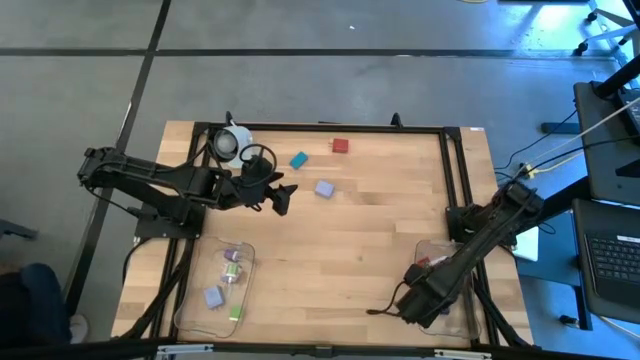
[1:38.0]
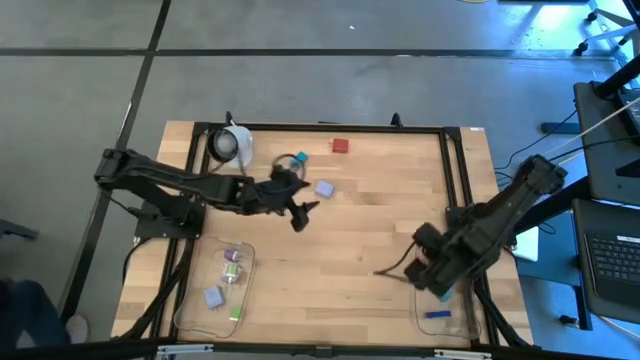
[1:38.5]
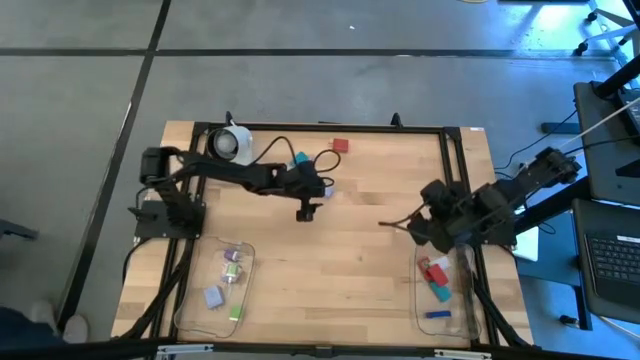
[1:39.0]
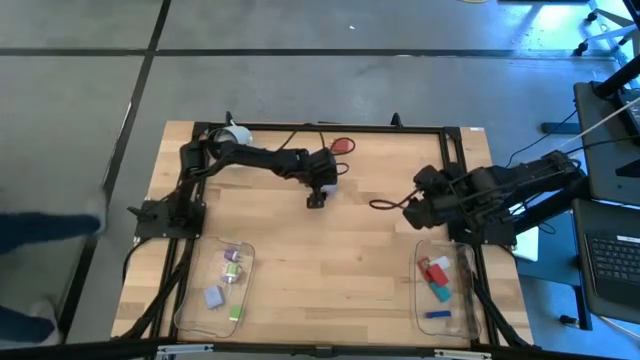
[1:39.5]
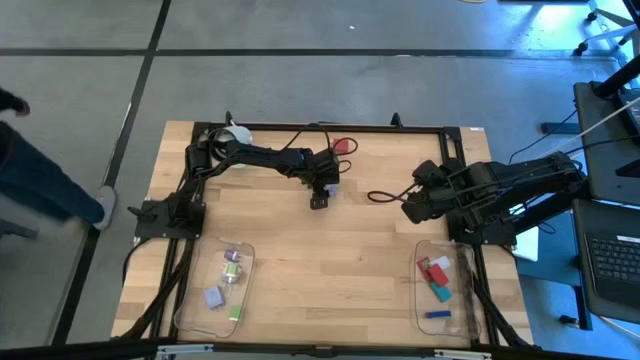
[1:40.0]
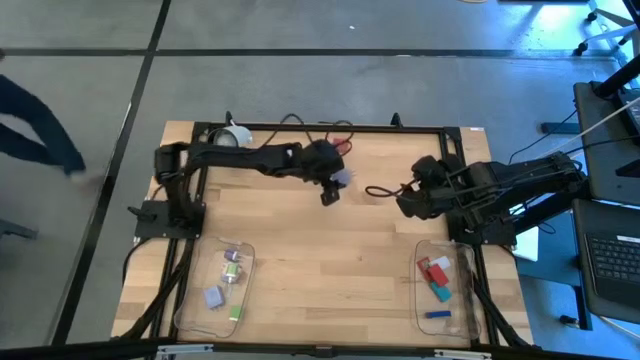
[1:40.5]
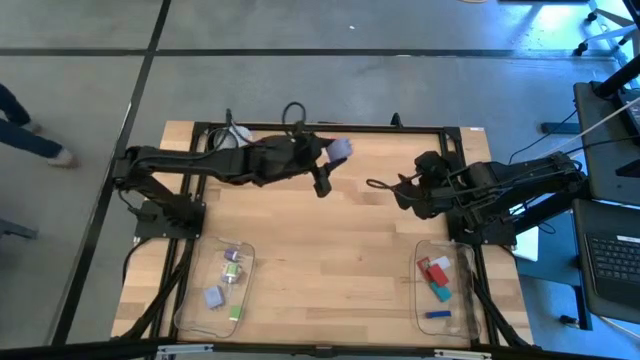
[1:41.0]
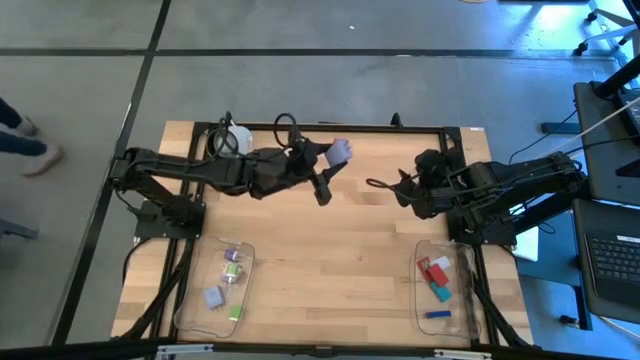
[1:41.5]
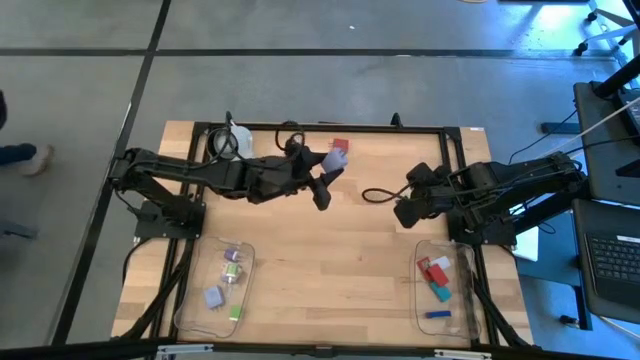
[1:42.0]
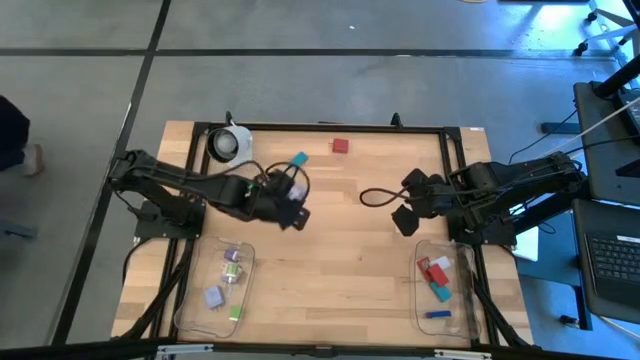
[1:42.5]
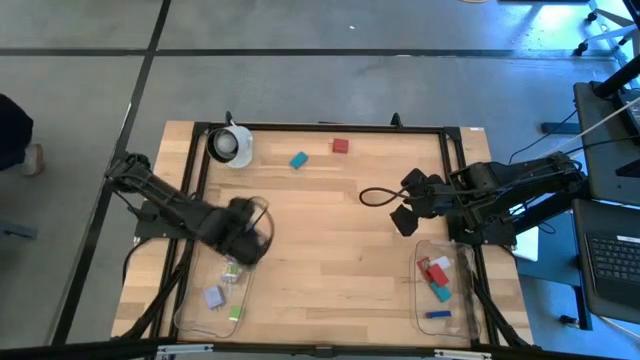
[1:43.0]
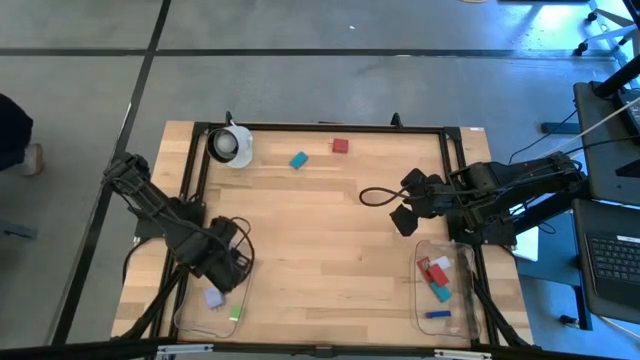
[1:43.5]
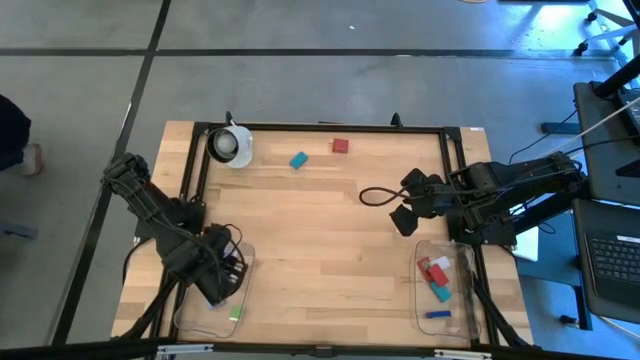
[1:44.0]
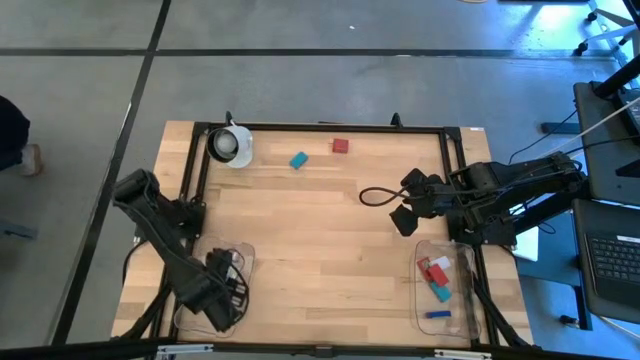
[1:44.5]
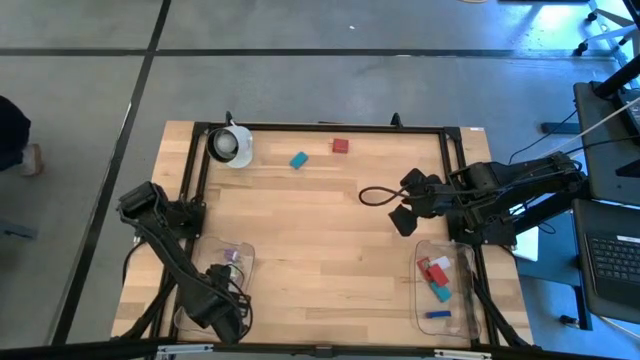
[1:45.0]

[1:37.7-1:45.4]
Task: Pick & Place Office items
Put the purple adapter into the left transparent bin

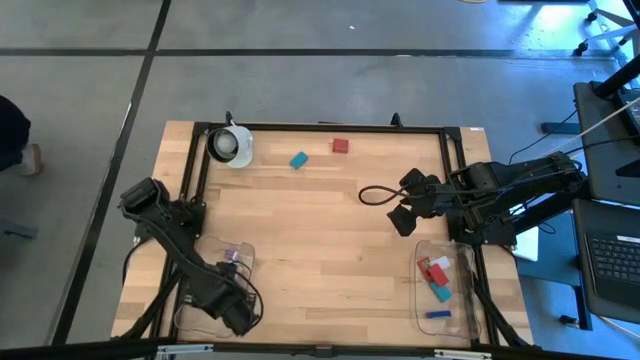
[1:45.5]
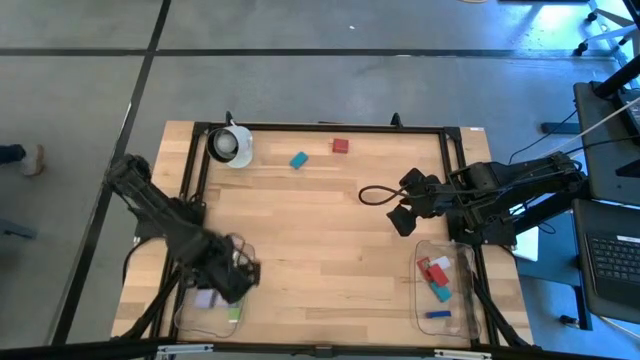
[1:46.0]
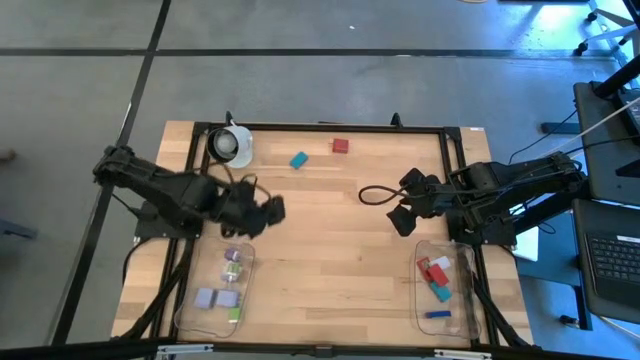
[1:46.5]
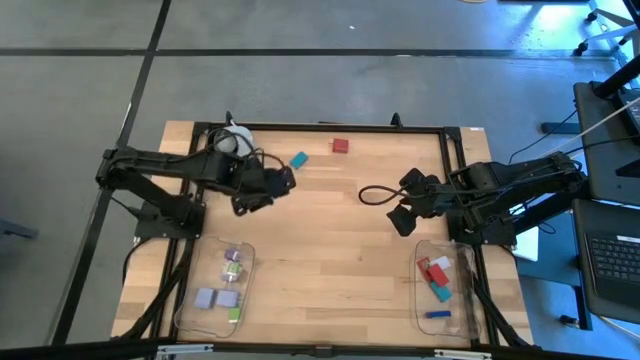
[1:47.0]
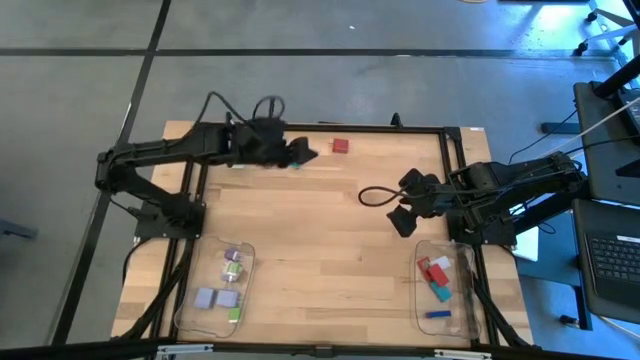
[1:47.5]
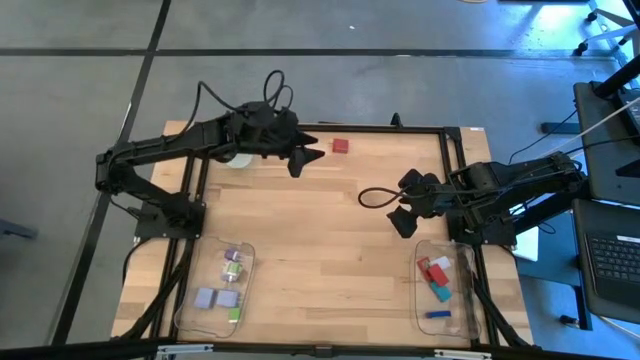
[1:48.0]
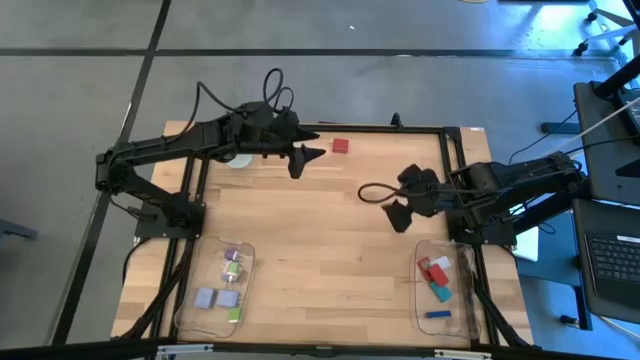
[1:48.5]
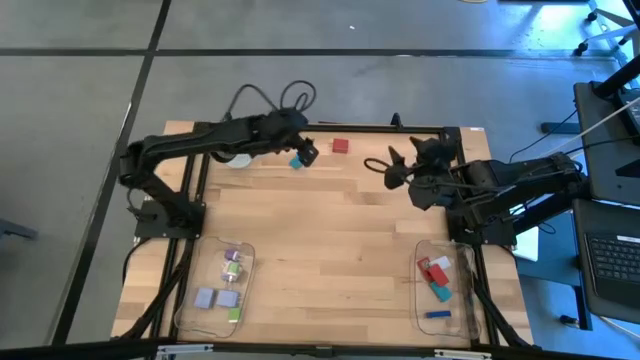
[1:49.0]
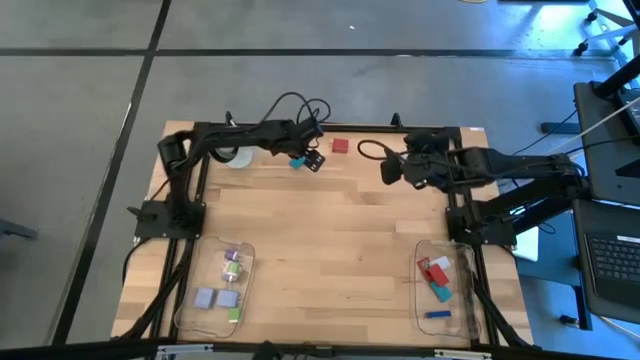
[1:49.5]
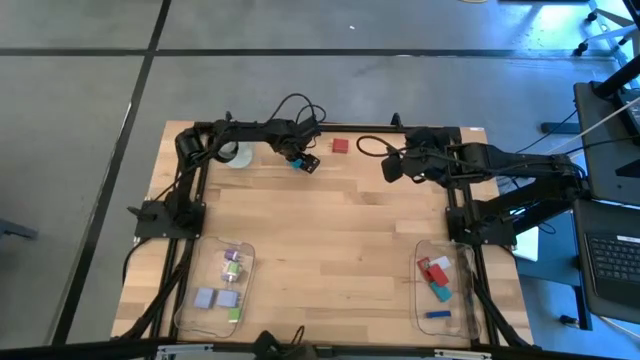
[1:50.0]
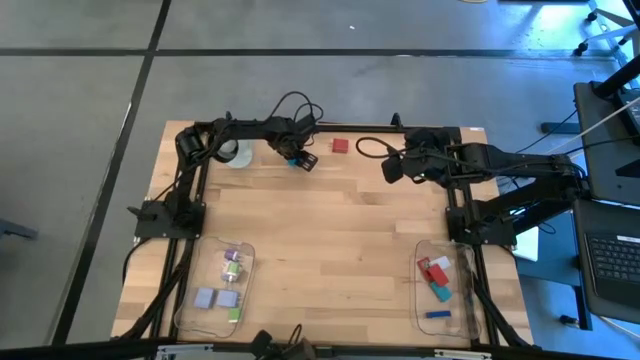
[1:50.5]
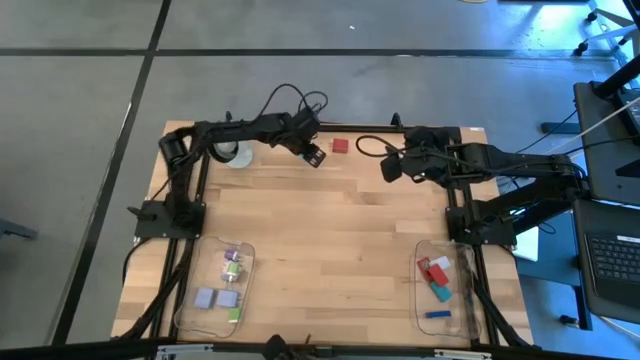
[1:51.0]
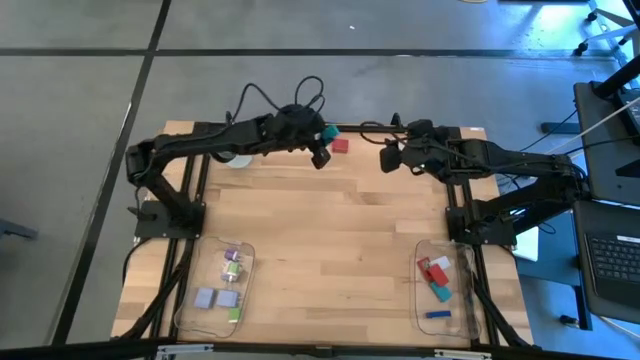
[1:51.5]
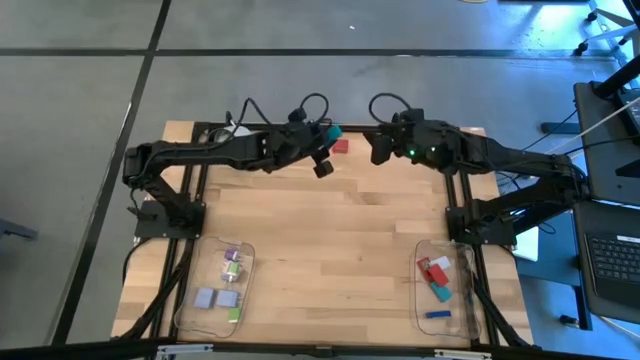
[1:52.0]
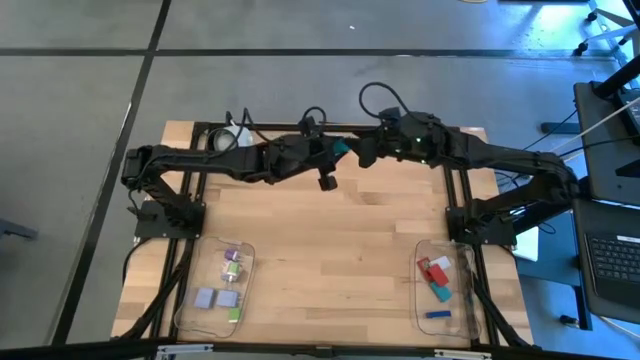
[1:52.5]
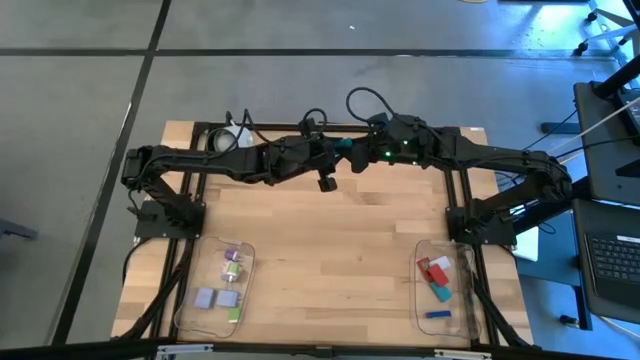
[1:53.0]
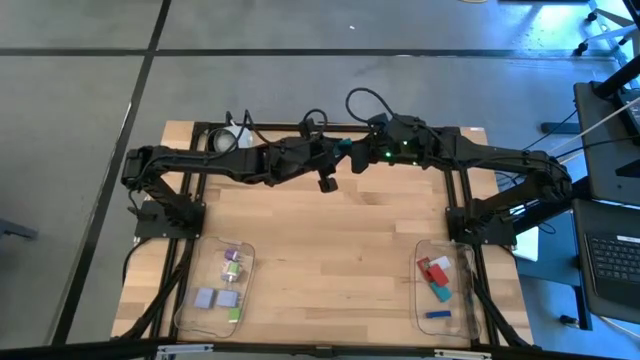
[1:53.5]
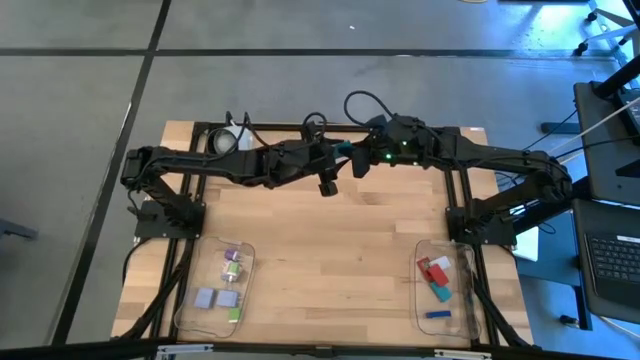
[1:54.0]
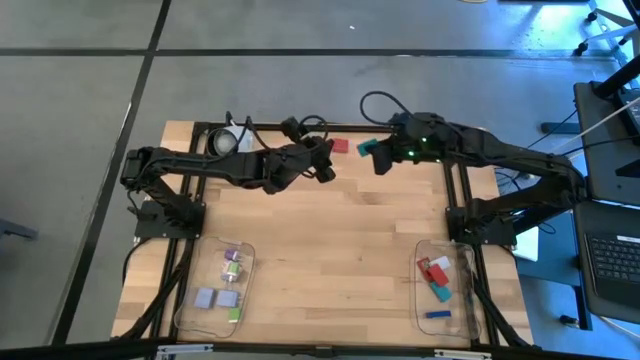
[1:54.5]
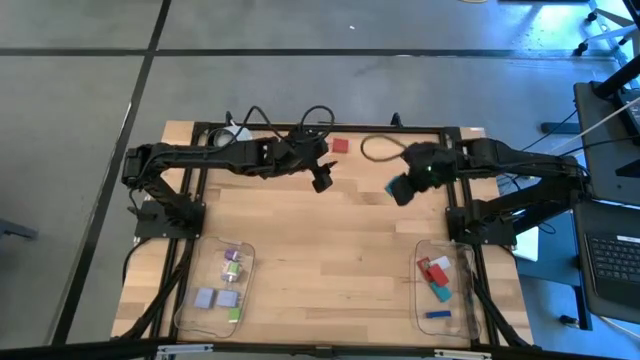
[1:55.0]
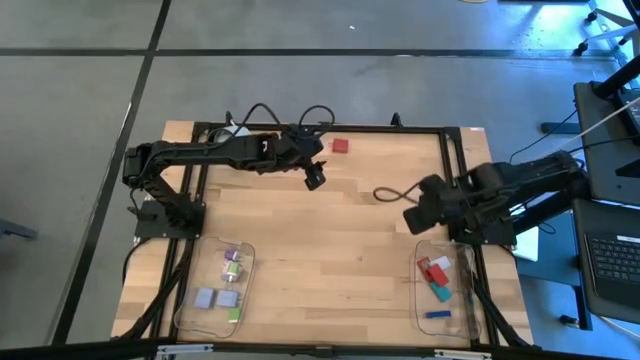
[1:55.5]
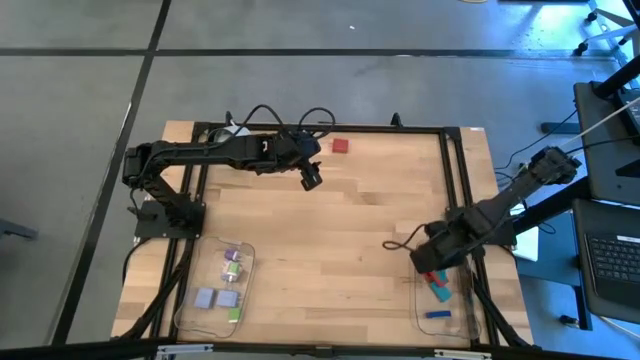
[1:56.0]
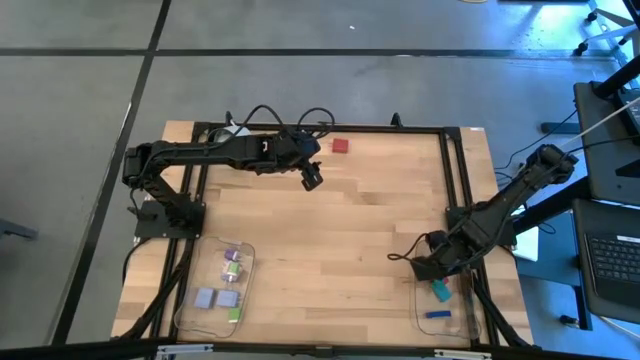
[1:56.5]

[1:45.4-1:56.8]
Put the light blue timer into the right transparent bin

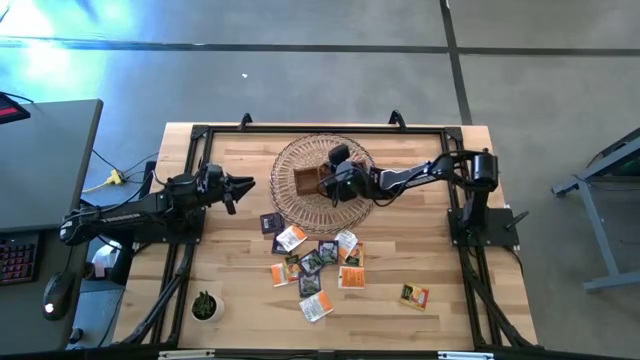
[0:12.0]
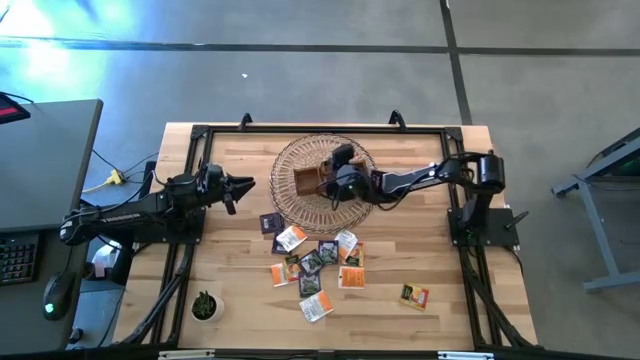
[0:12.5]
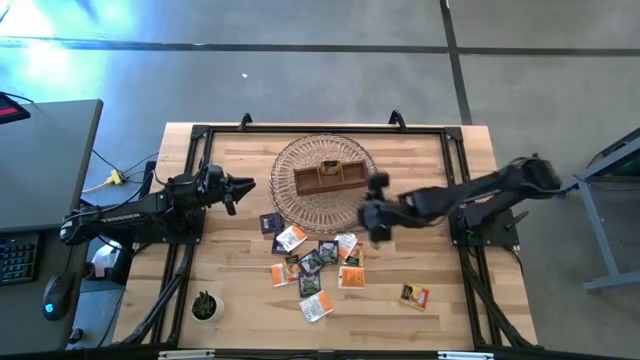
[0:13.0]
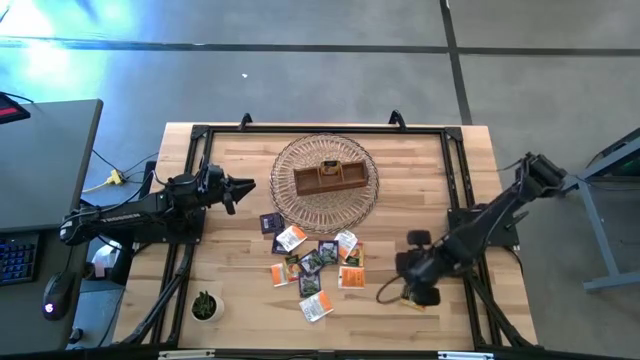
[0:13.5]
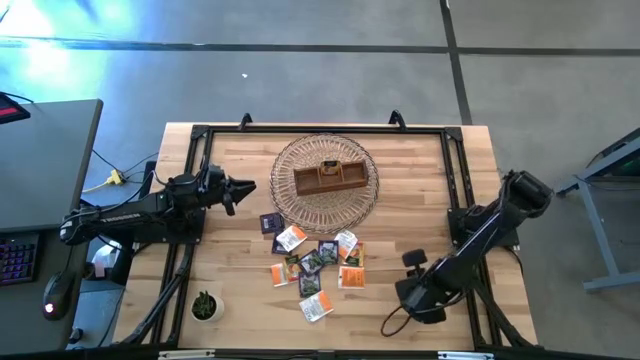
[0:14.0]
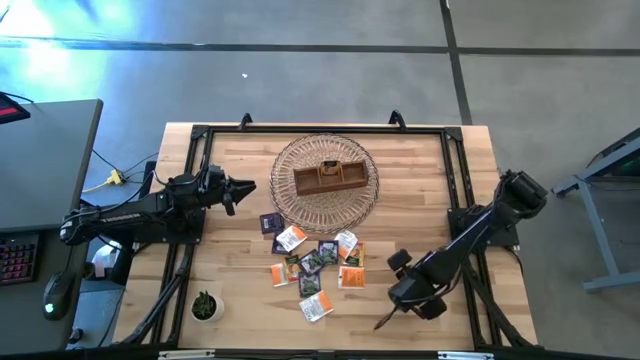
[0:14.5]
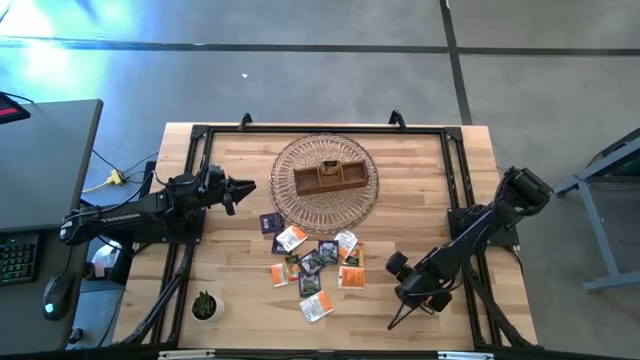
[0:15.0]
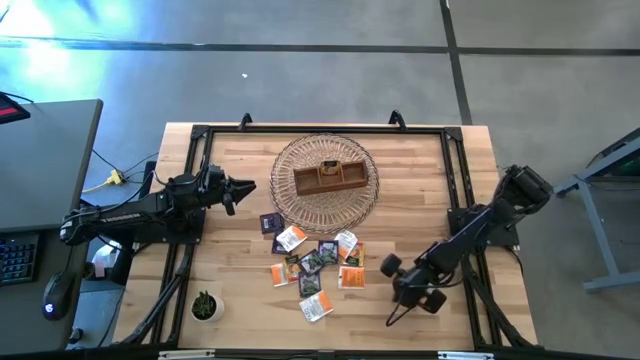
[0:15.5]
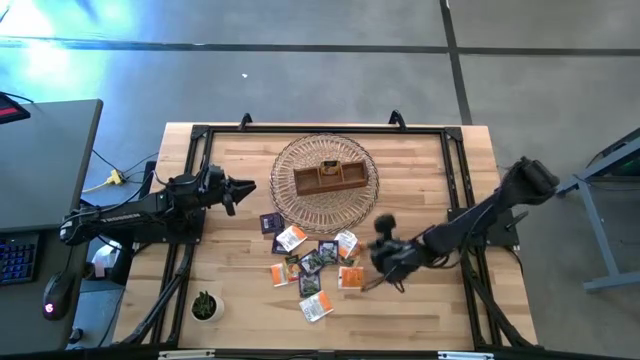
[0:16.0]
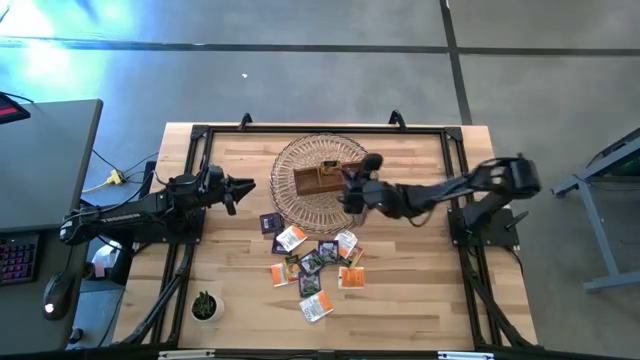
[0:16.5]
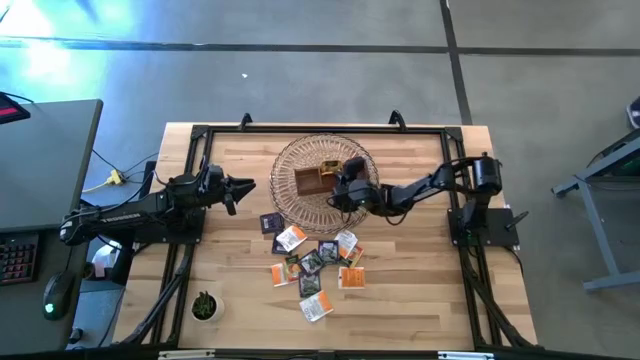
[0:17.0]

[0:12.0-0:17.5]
Task: Pick & Place Tea
Put the orange tea bag into the middle section of the wooden organizer
